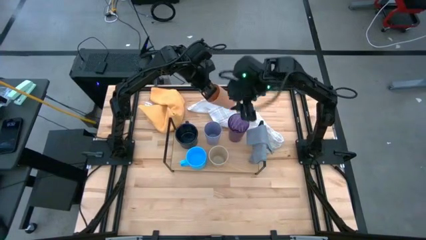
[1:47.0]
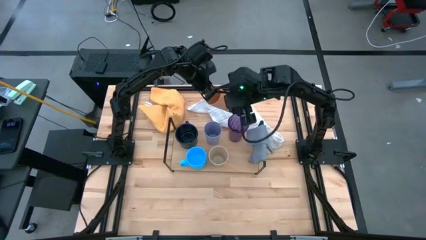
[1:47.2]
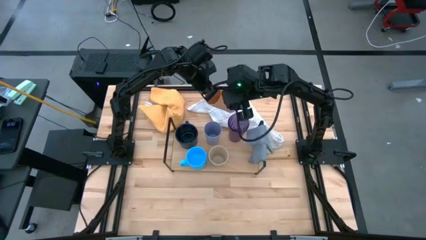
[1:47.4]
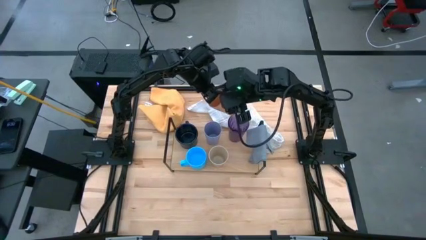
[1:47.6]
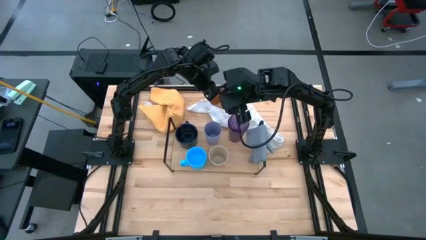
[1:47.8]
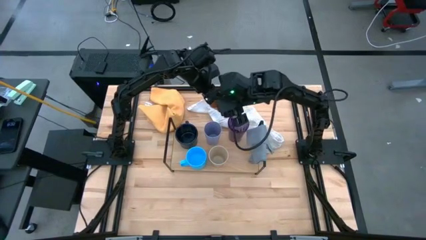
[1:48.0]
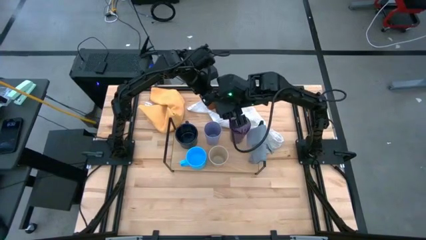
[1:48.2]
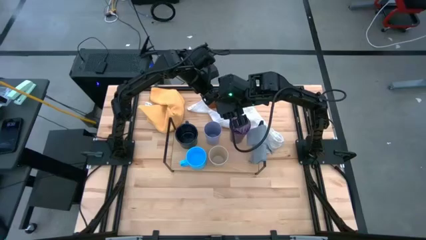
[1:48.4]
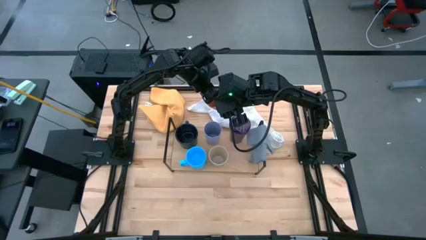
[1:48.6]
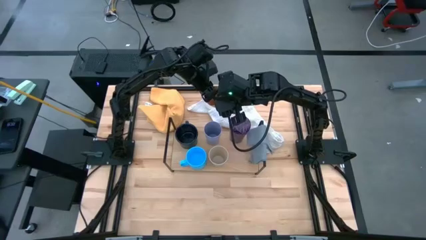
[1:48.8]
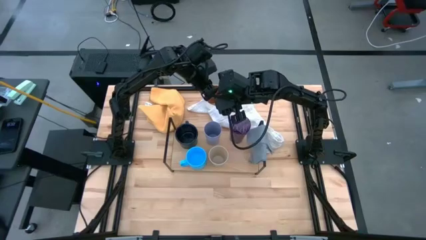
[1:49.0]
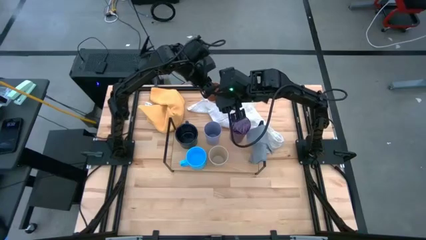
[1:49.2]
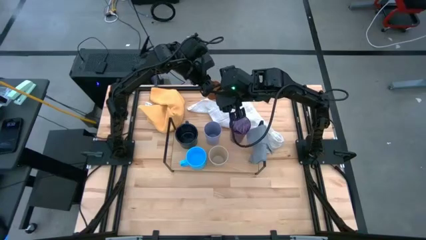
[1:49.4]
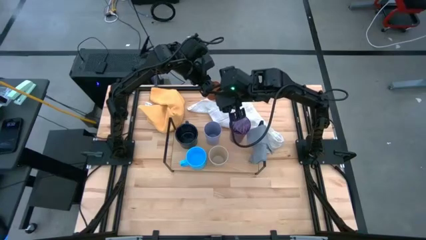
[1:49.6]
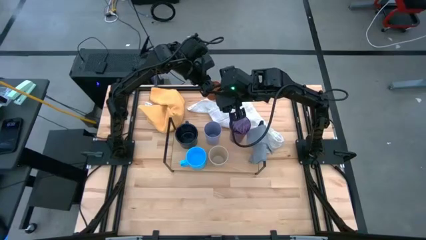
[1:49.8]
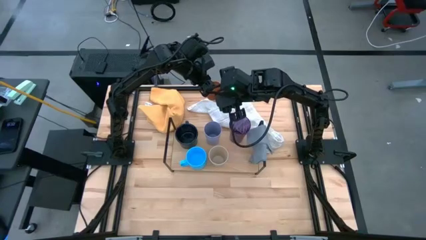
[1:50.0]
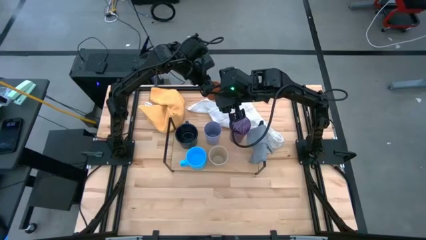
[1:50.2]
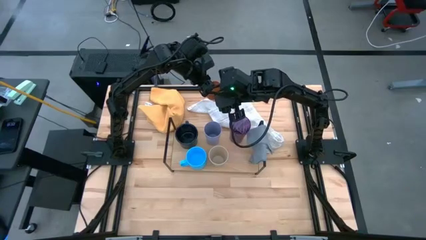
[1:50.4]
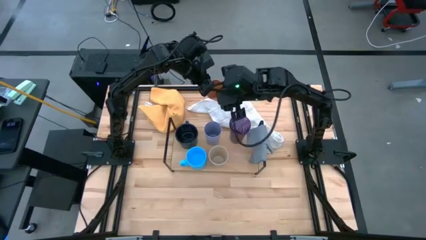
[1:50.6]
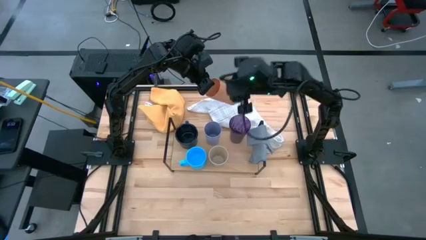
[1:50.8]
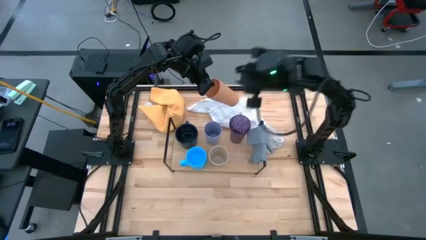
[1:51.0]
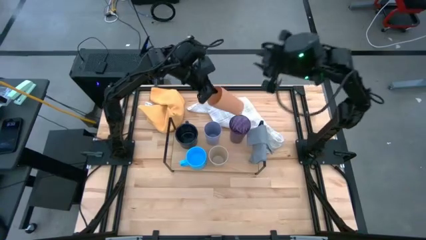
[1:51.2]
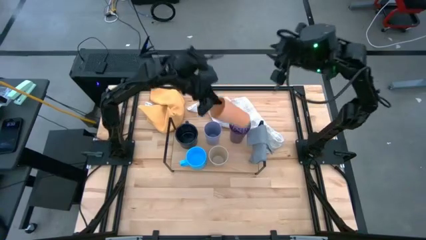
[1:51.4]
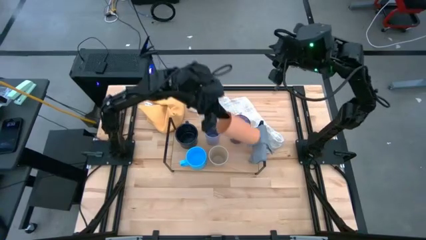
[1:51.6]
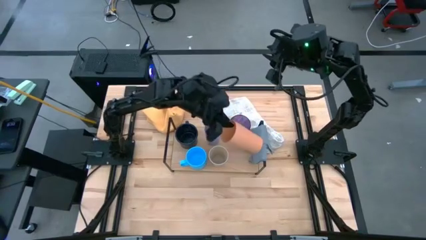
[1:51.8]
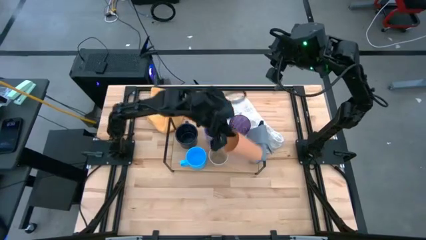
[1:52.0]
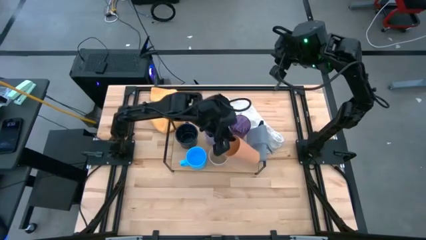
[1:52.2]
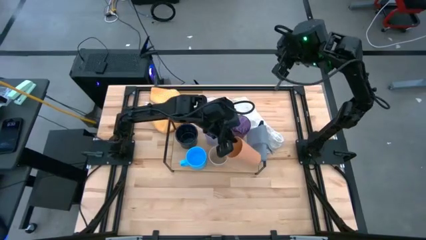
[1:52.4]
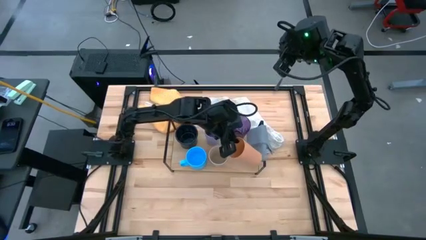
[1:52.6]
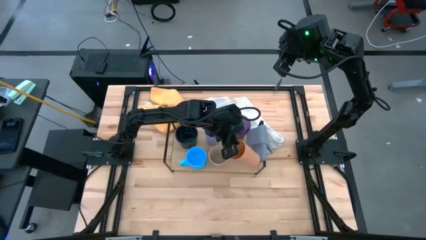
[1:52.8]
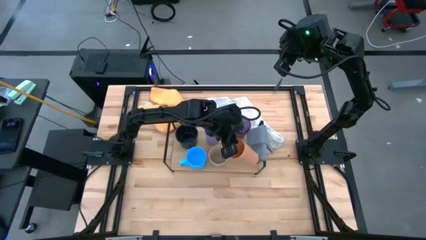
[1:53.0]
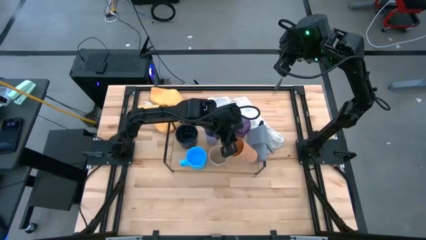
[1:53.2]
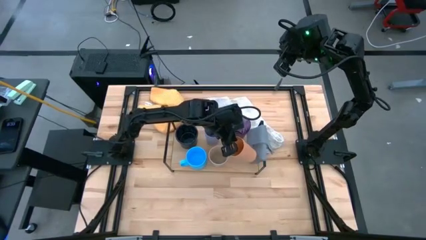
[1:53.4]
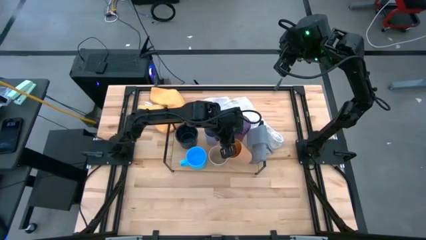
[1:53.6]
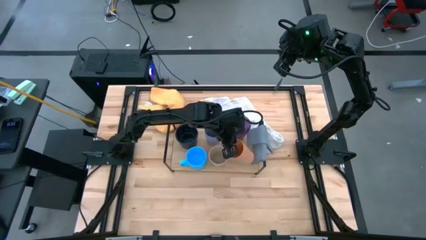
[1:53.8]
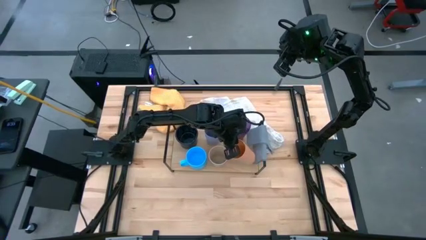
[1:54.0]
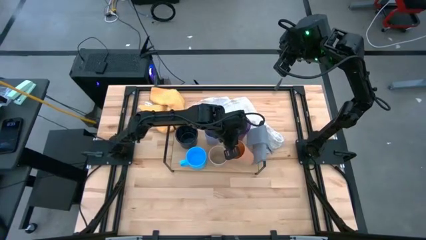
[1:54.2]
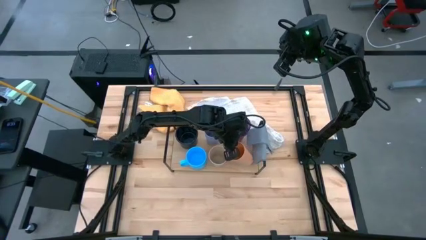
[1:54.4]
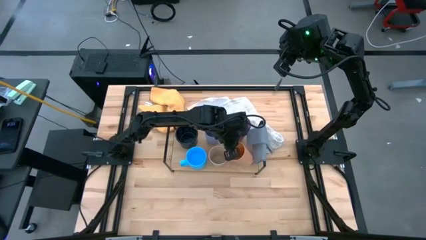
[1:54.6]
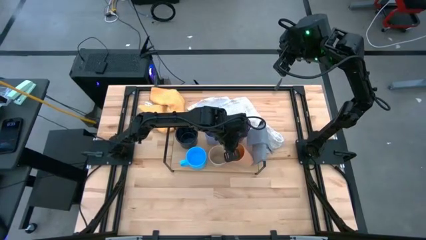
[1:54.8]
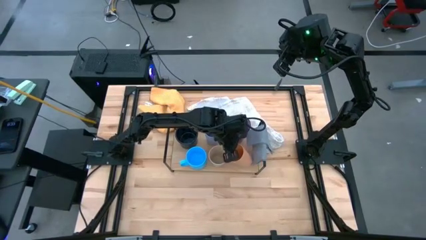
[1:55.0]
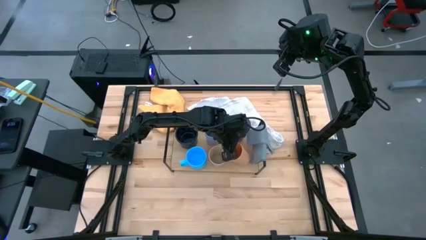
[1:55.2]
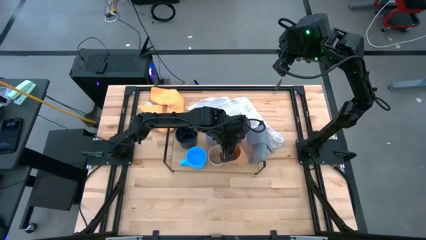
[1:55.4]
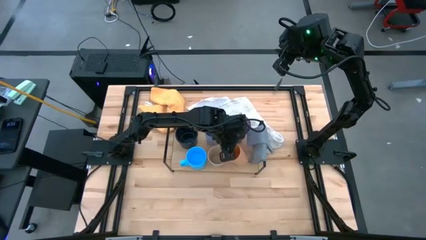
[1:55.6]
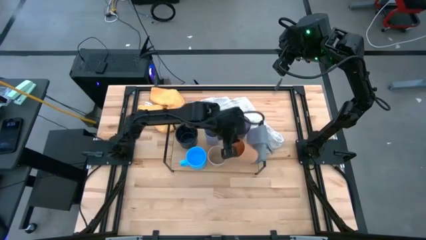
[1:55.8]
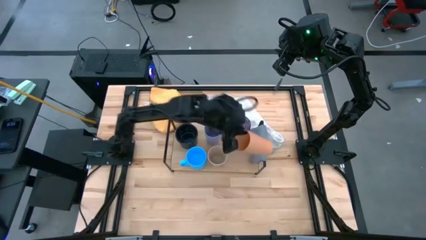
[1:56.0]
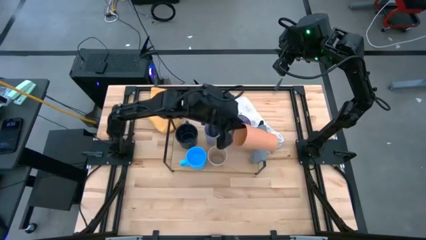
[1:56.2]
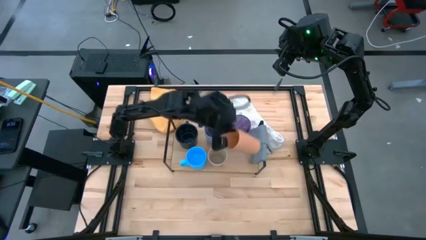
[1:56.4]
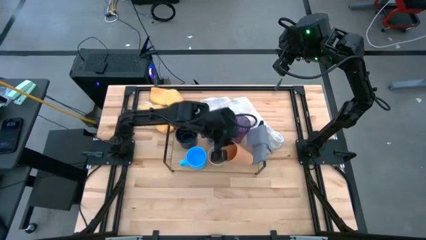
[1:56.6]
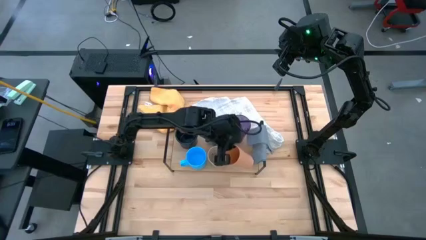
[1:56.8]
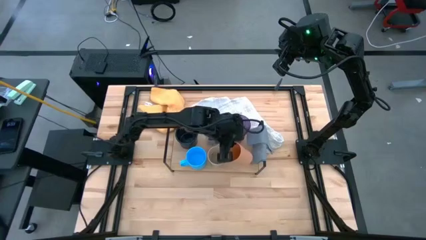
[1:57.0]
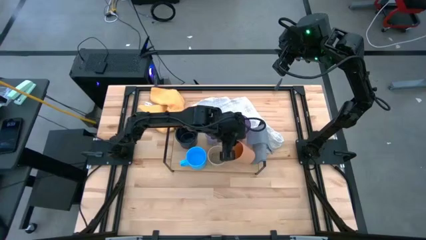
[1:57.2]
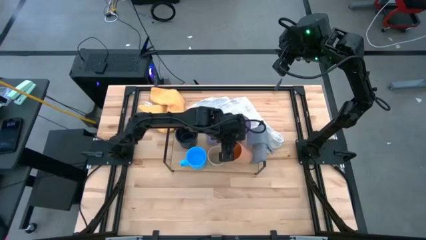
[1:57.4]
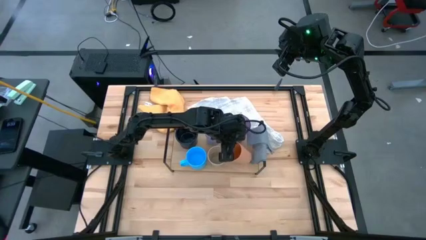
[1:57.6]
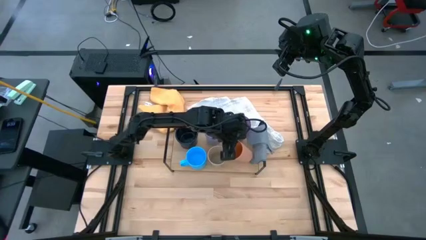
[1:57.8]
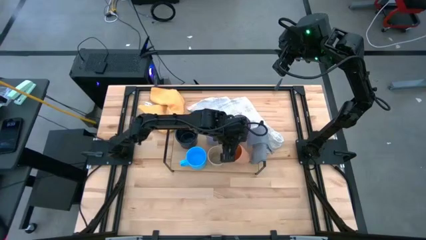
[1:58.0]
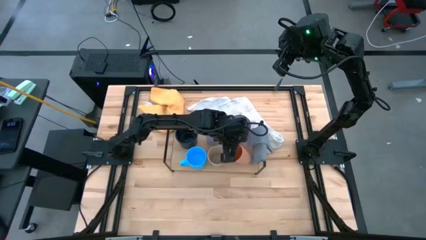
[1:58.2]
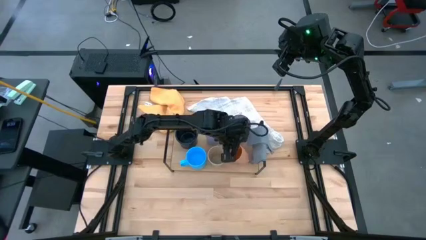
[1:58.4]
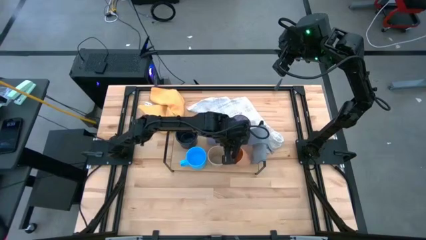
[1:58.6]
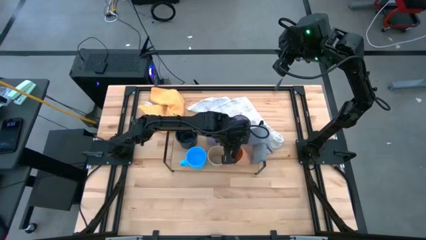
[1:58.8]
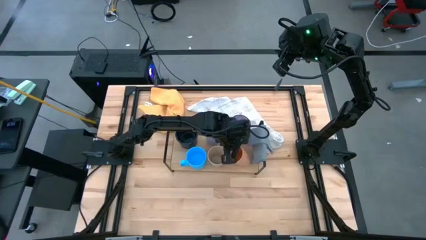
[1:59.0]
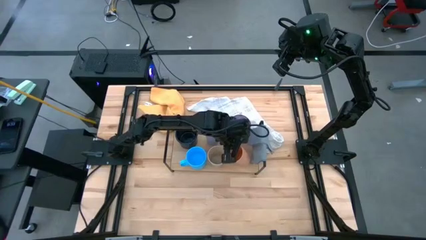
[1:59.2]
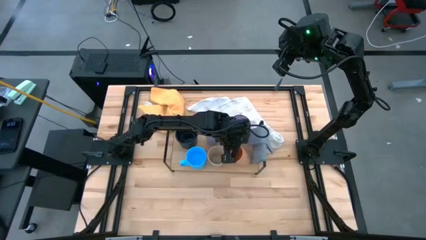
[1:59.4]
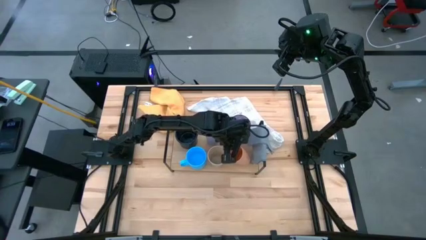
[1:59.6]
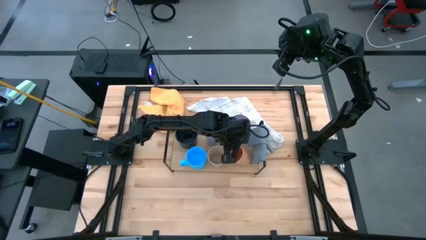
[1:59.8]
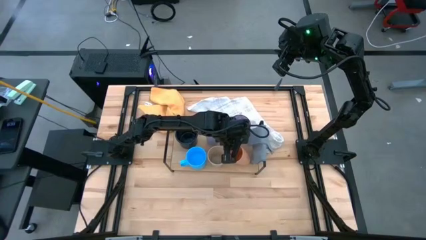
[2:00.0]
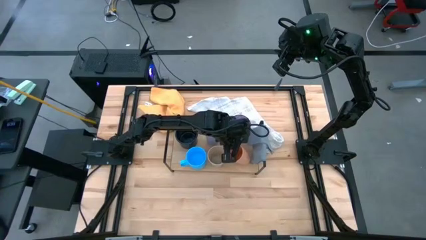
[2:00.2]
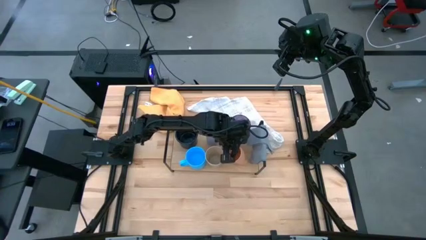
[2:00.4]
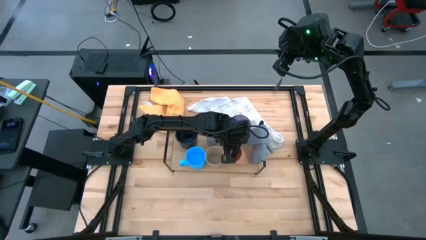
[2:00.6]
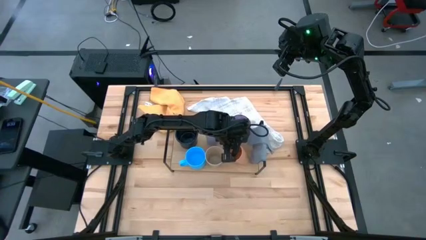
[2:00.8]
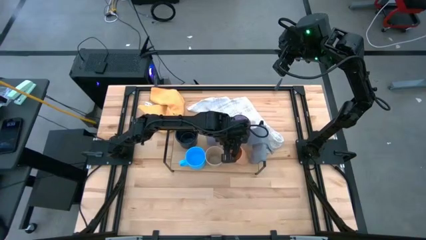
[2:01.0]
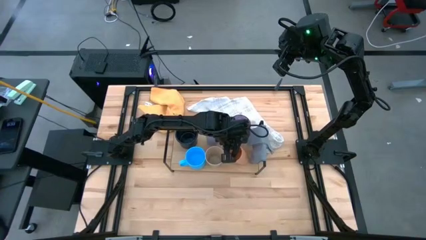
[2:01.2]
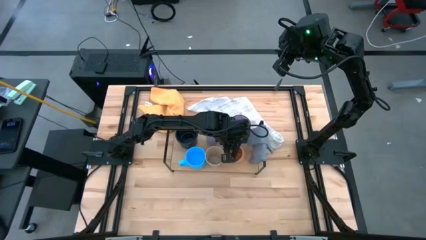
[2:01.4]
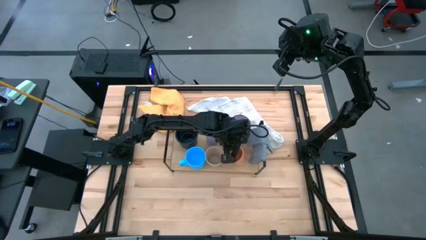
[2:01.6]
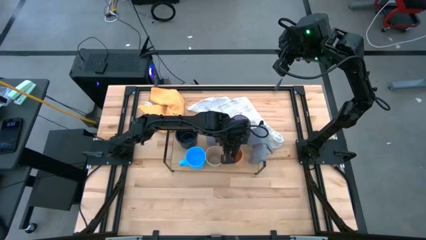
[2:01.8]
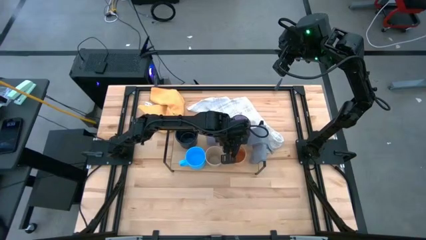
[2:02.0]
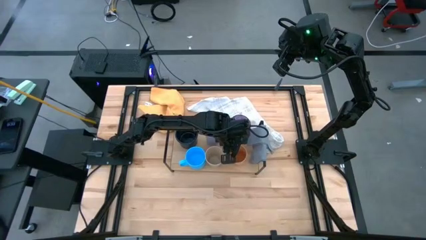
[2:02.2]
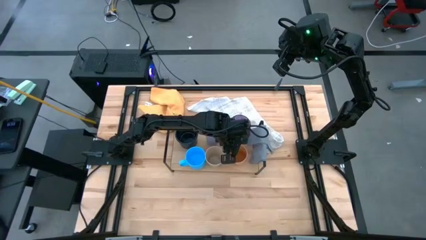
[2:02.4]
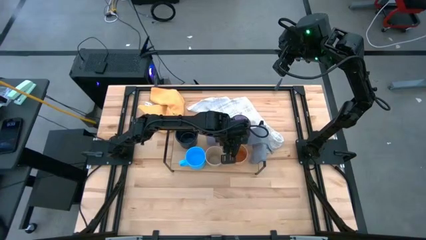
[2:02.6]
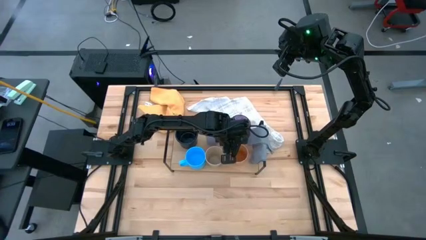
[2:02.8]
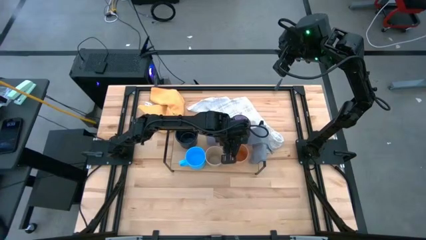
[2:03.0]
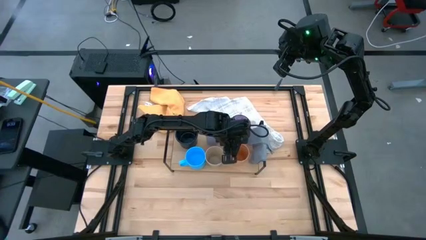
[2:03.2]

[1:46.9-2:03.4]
Task: Stack small to large cups/mugs on shelf
Put the orange cup on the shelf
